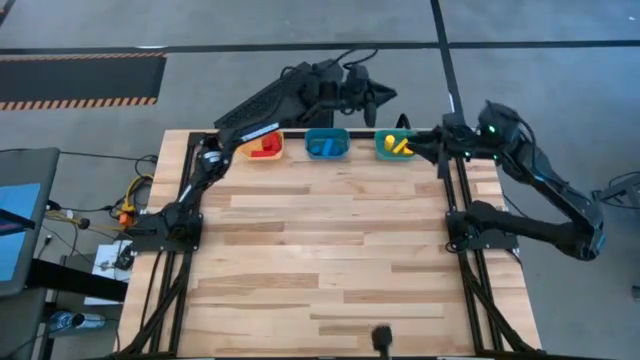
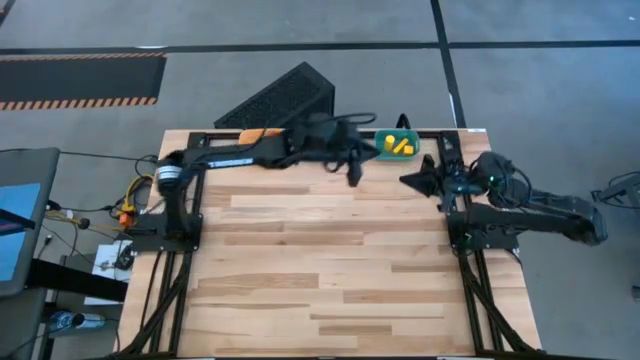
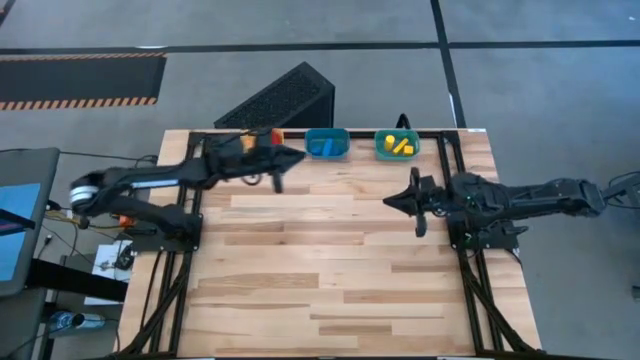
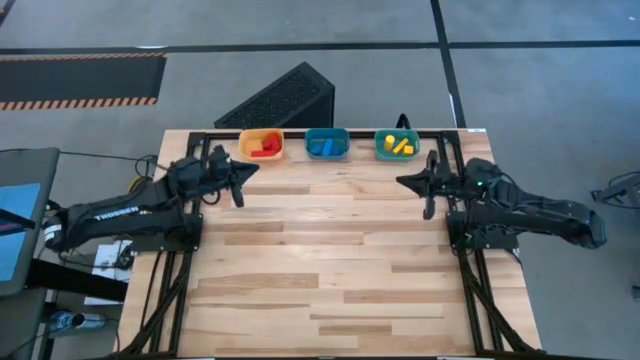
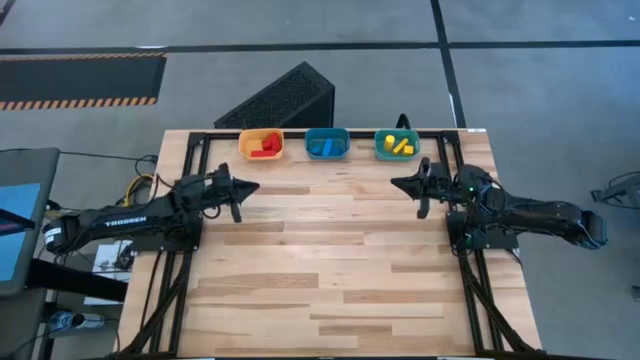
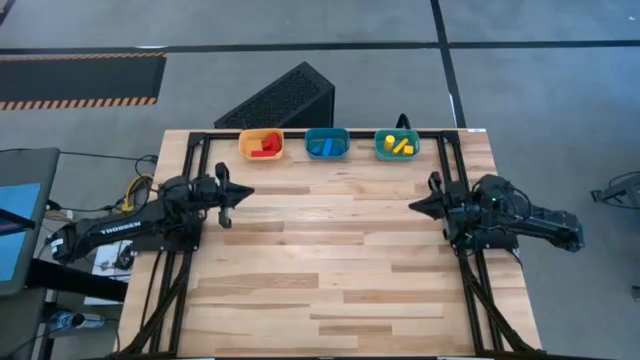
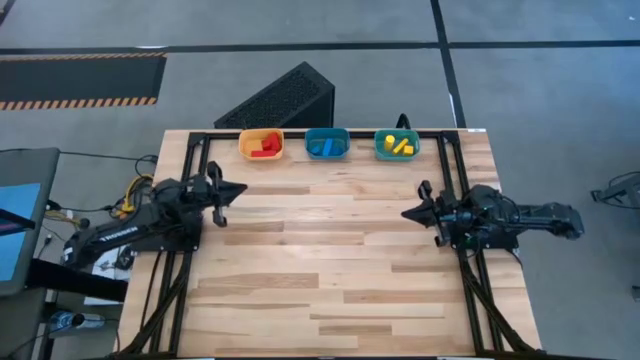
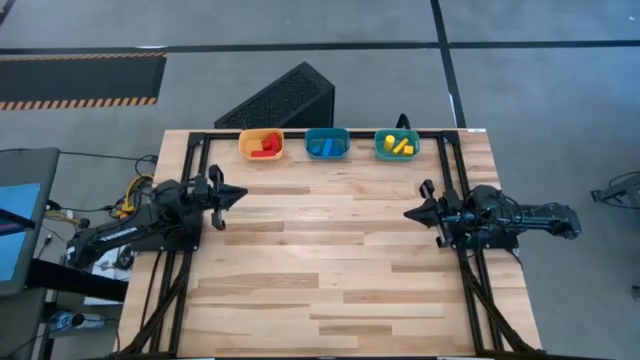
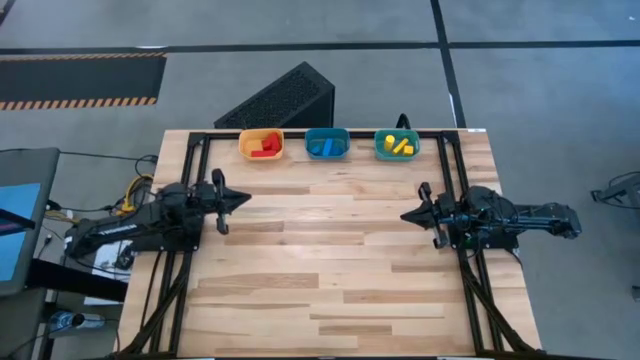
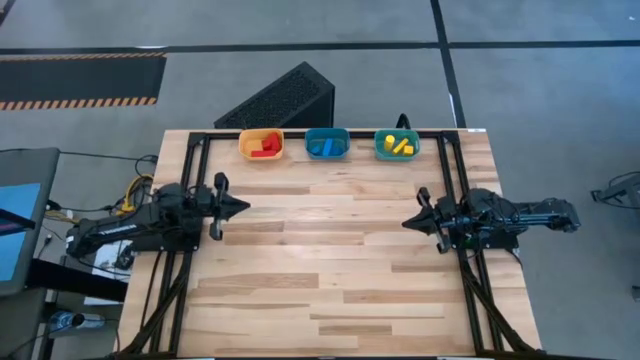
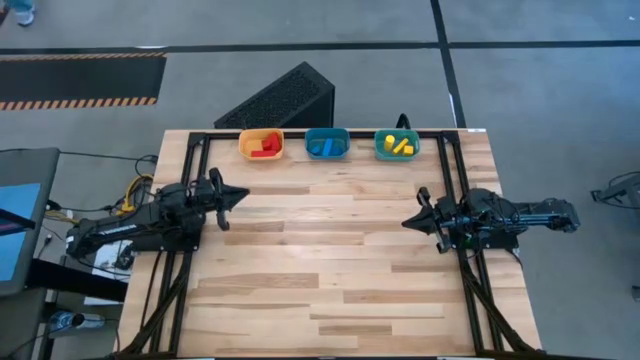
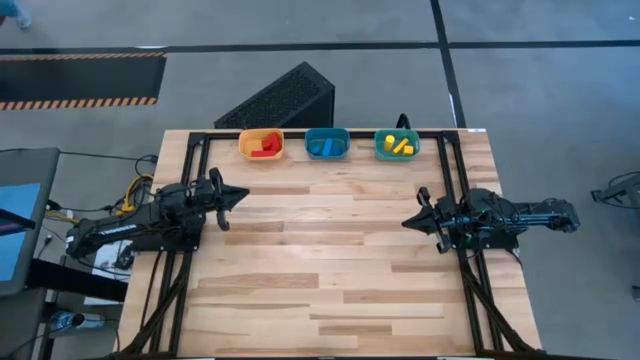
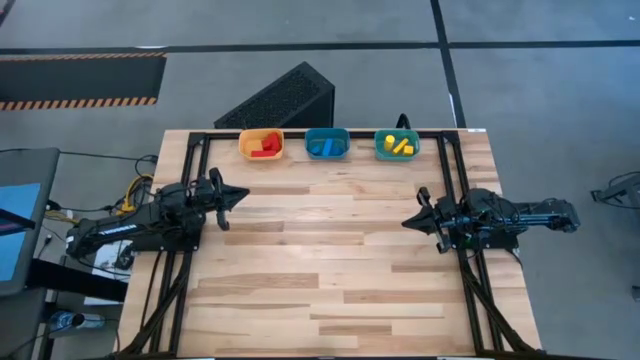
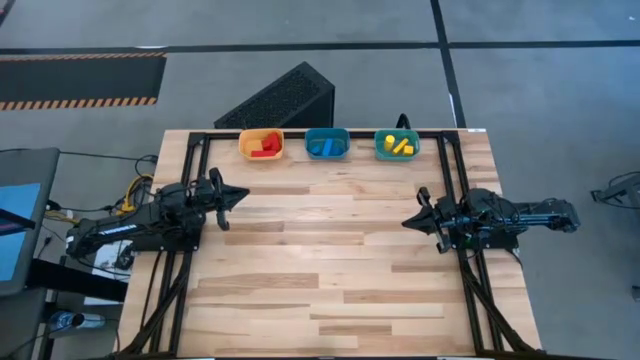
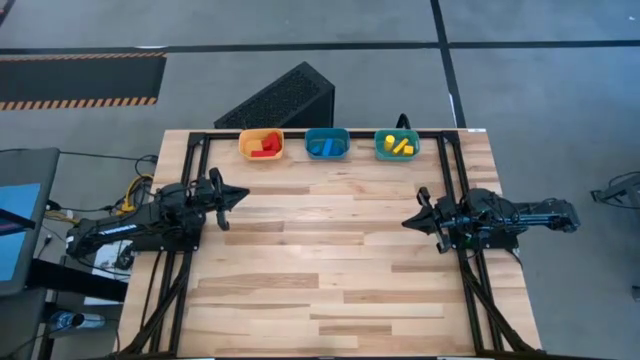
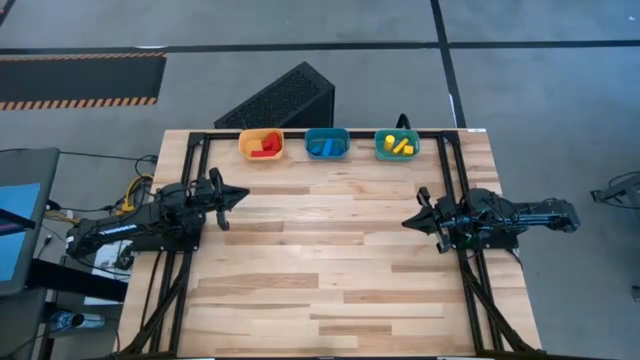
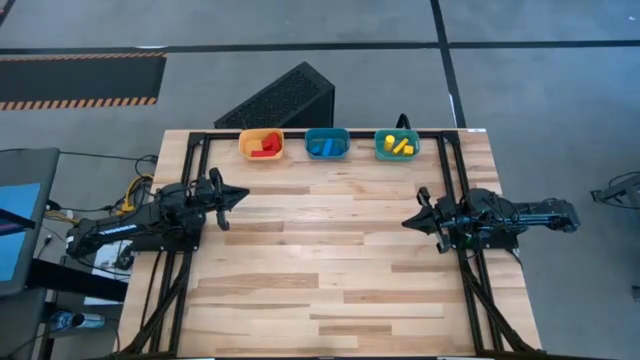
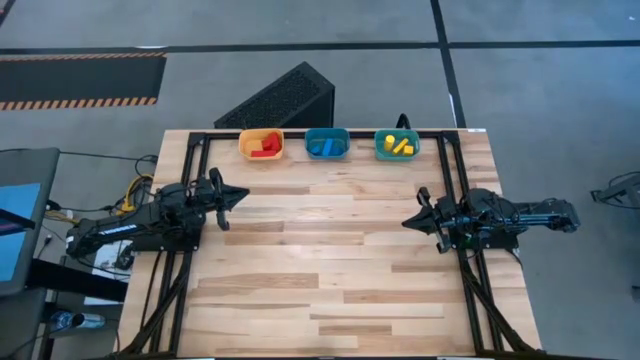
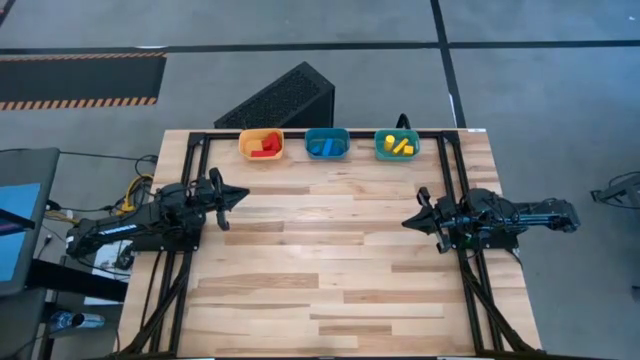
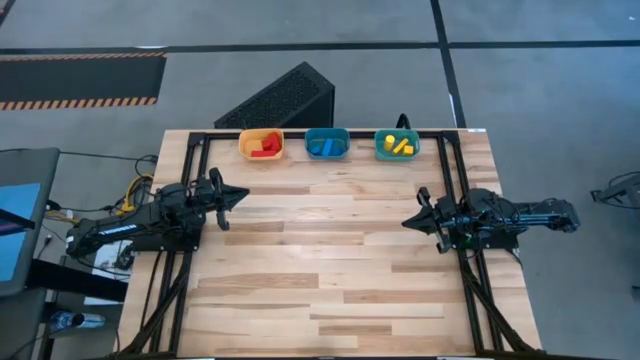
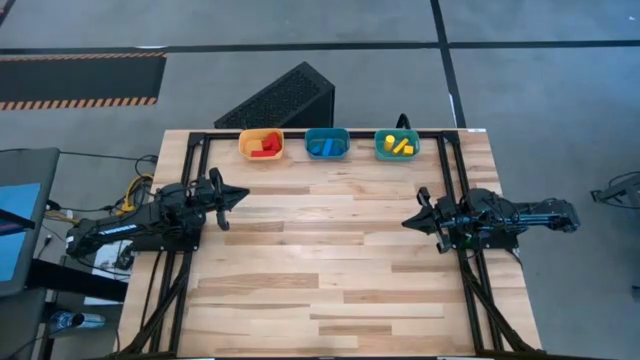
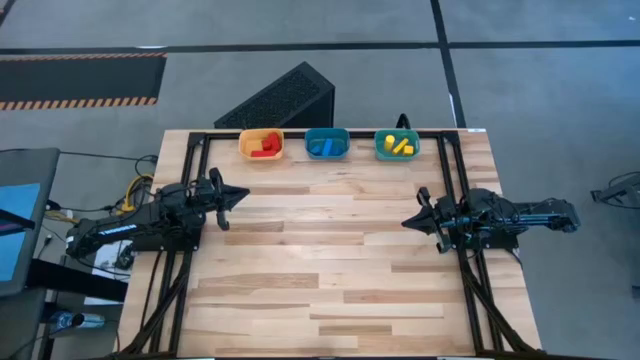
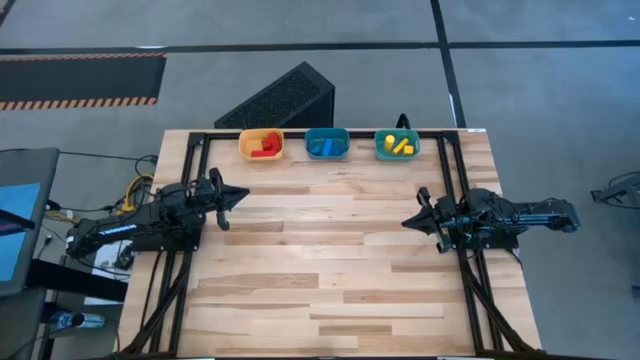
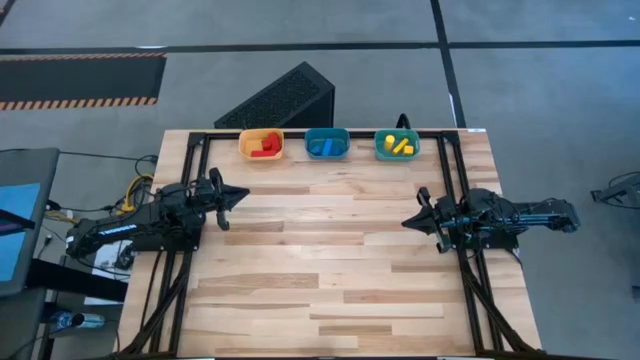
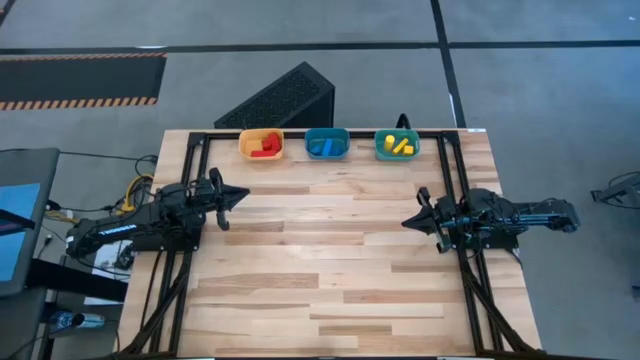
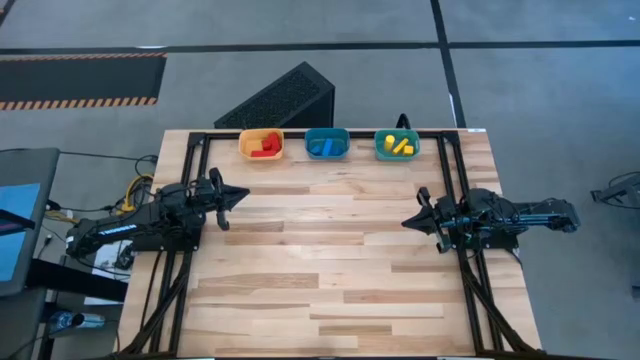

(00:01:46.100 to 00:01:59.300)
Task: Sort & place blocks by color
Return to Home Position

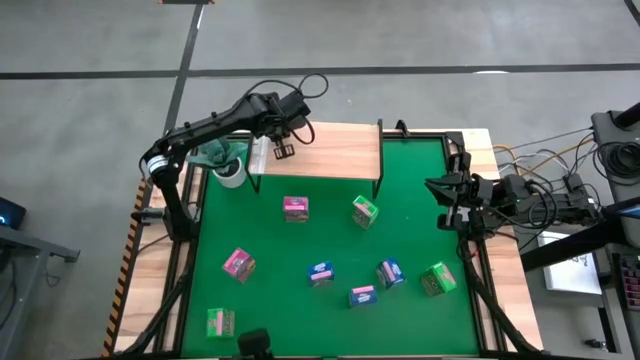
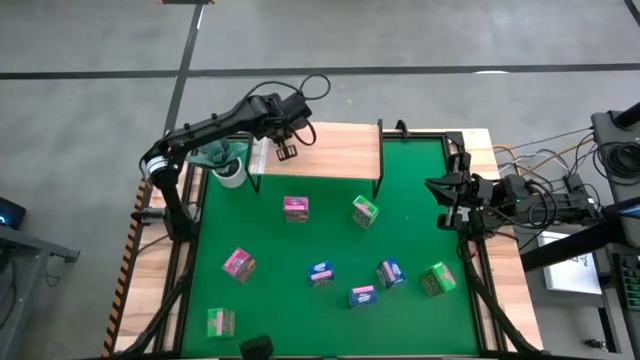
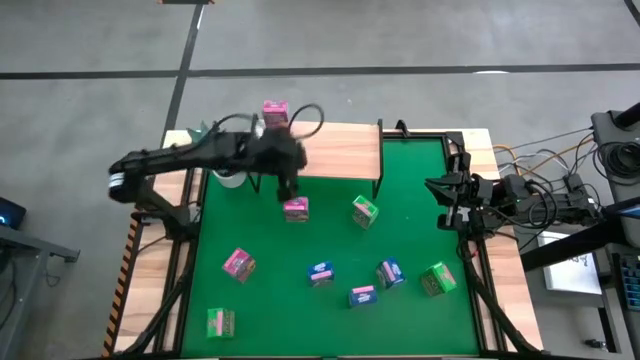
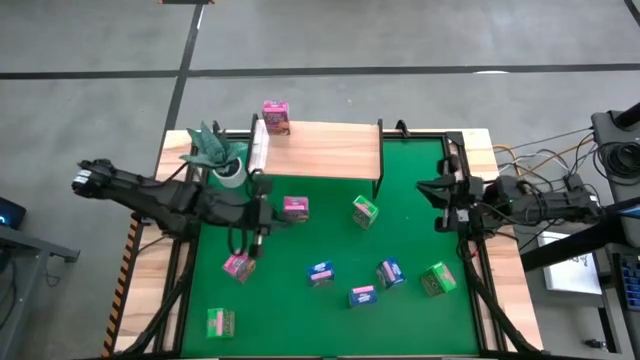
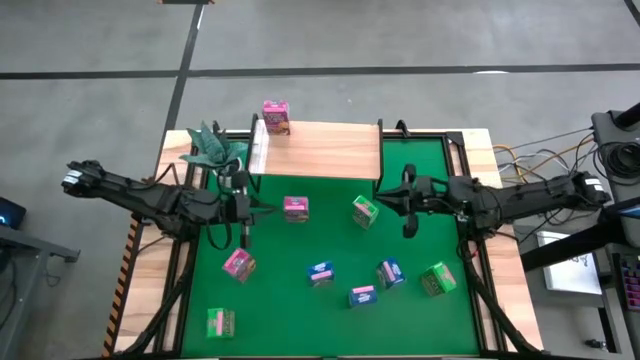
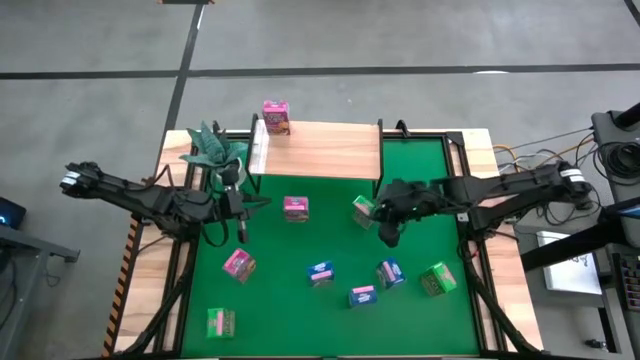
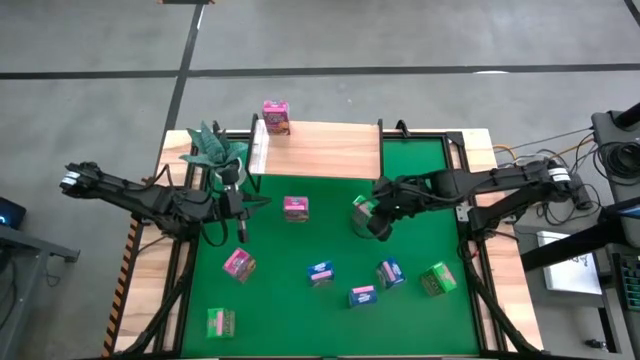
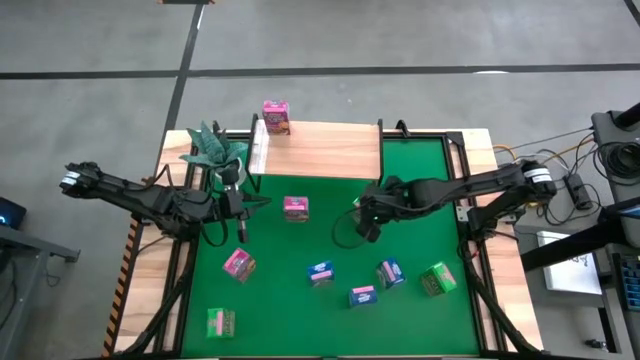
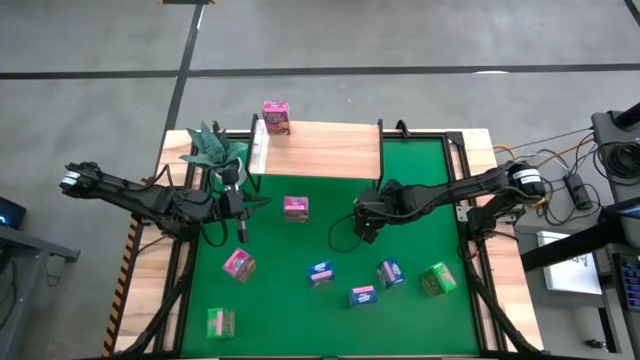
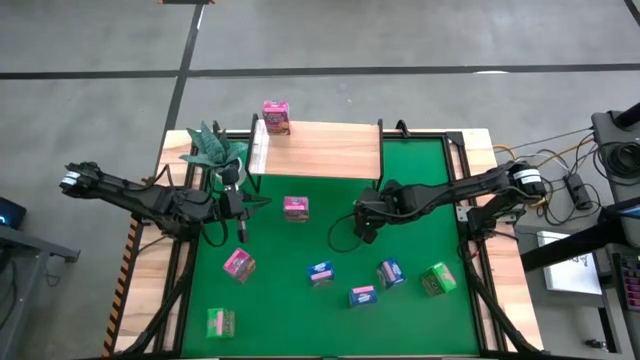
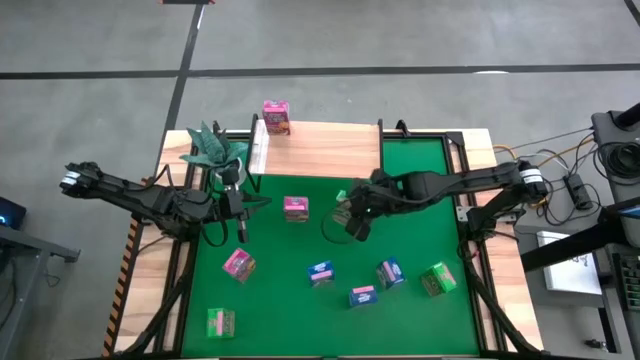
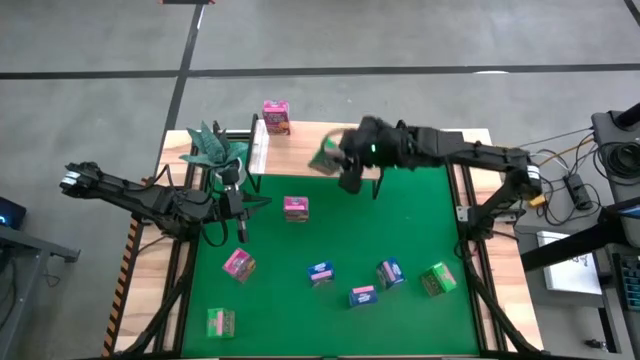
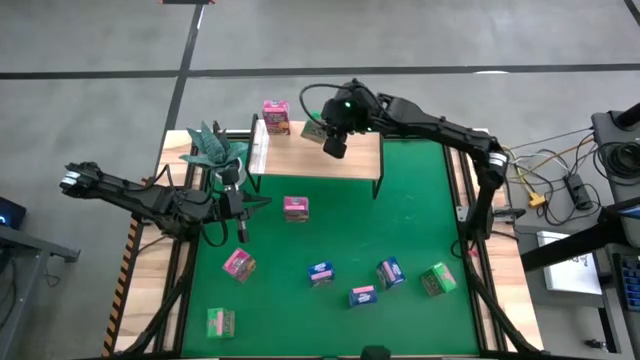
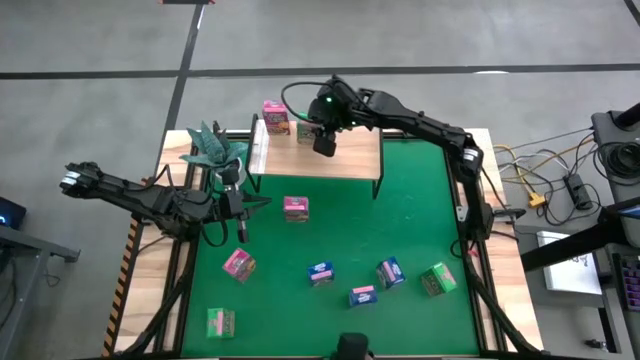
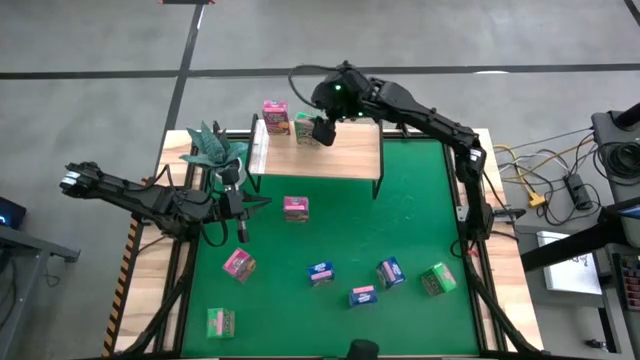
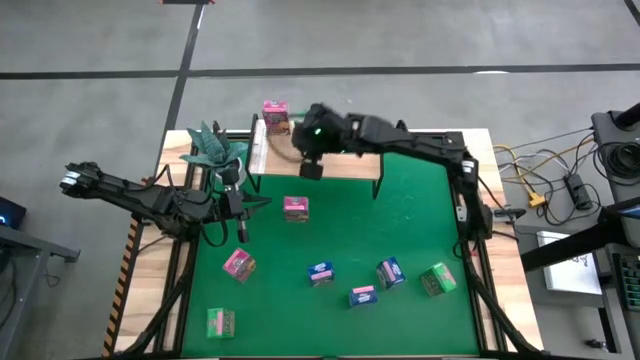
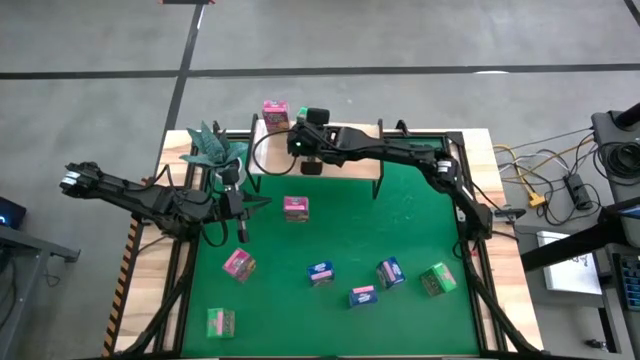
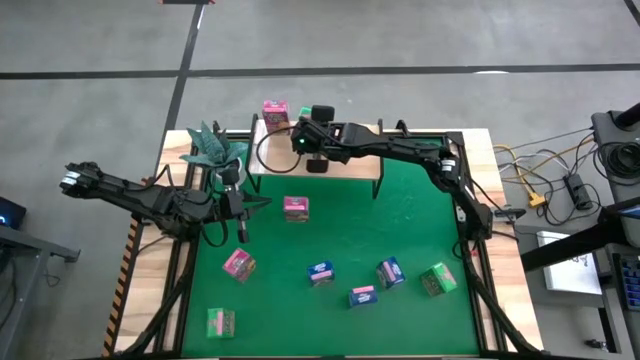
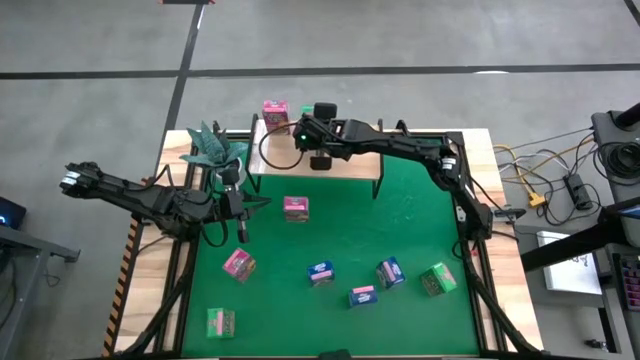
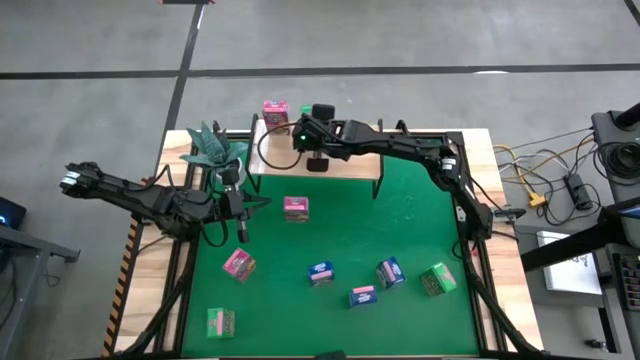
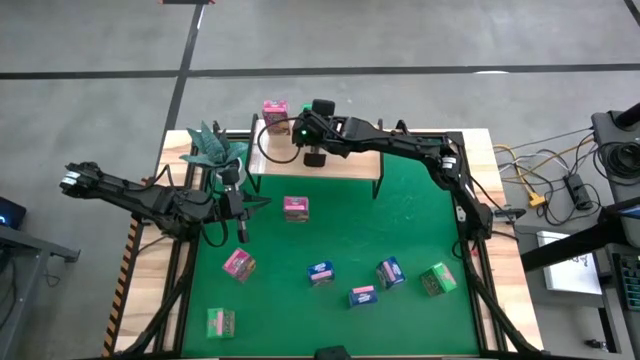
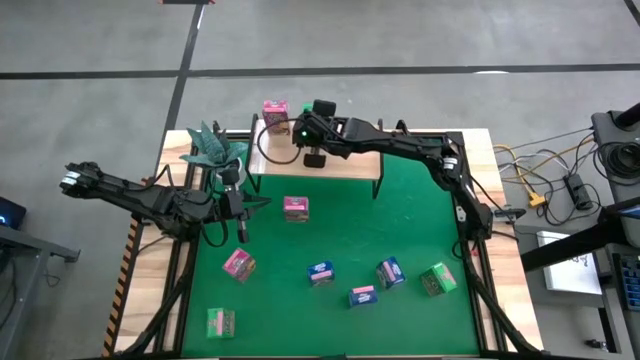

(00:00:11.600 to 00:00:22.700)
Task: Stack cereal on shelf
Put the top green cereal box on the shelf
